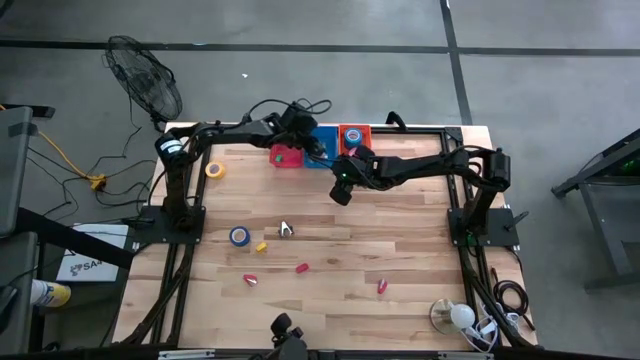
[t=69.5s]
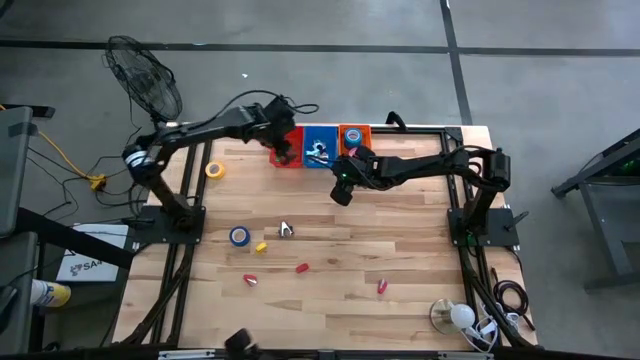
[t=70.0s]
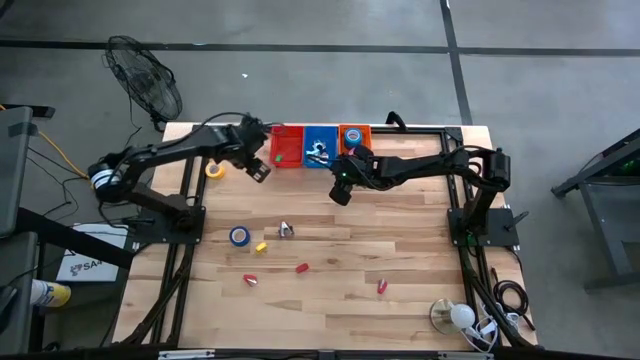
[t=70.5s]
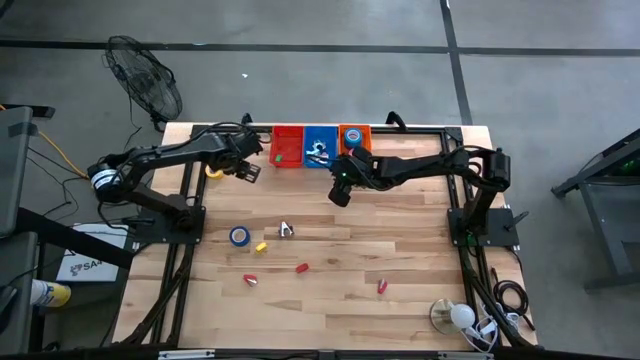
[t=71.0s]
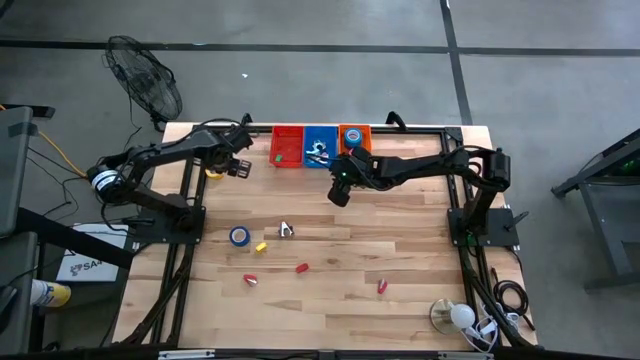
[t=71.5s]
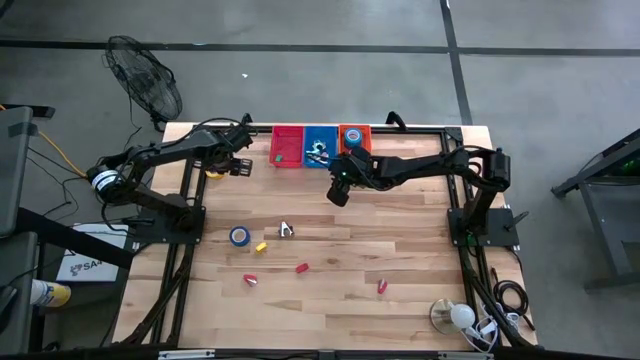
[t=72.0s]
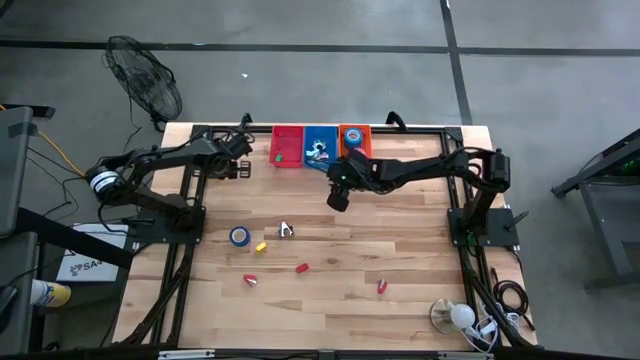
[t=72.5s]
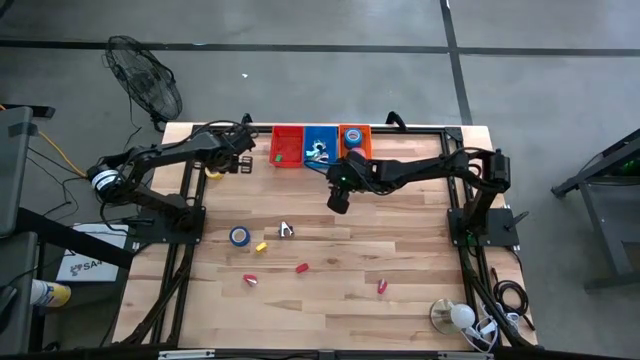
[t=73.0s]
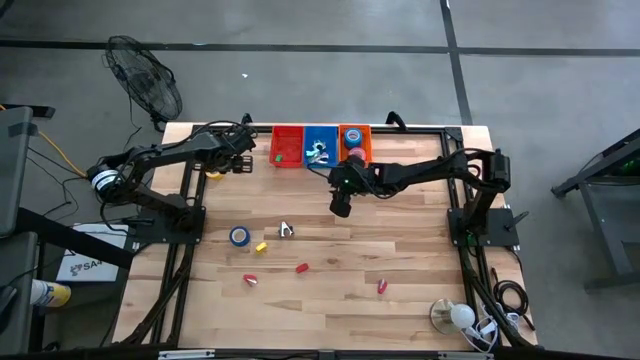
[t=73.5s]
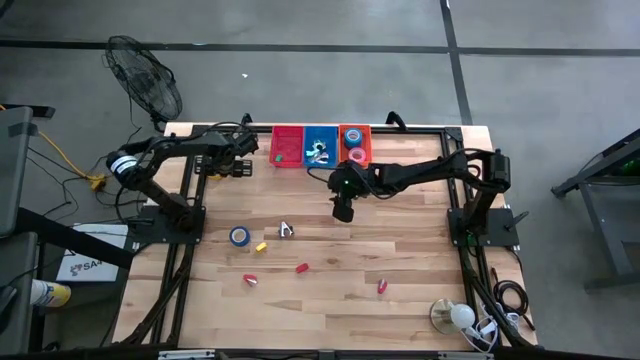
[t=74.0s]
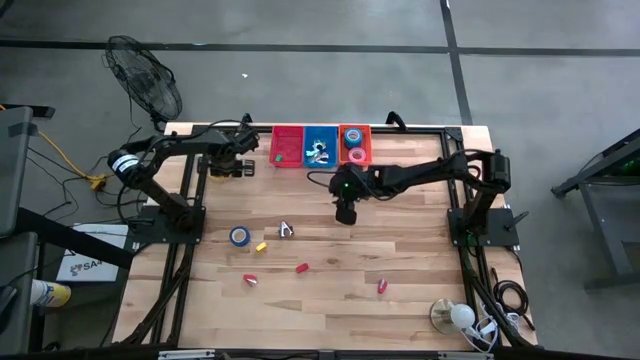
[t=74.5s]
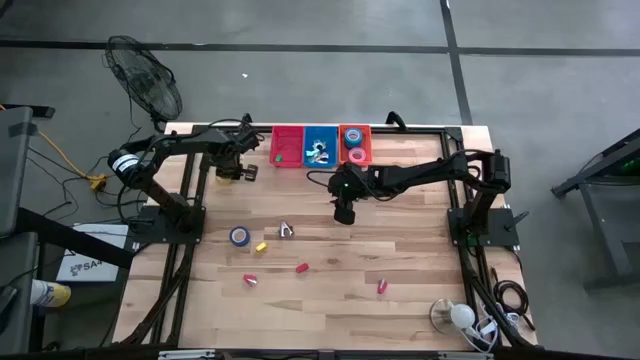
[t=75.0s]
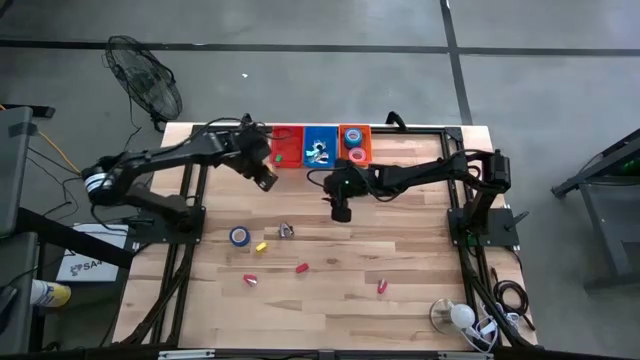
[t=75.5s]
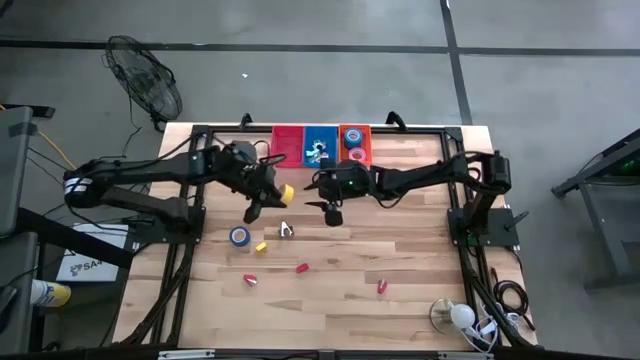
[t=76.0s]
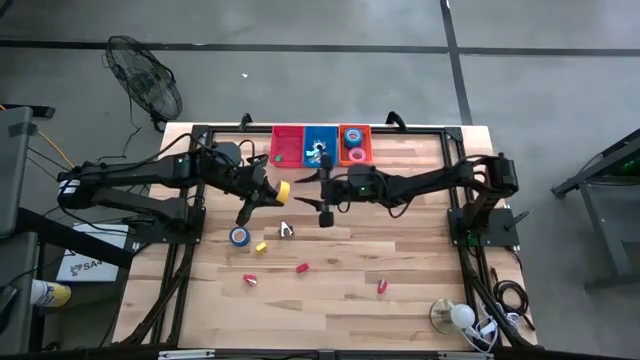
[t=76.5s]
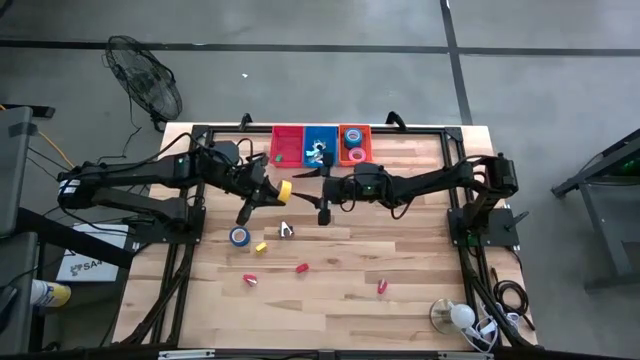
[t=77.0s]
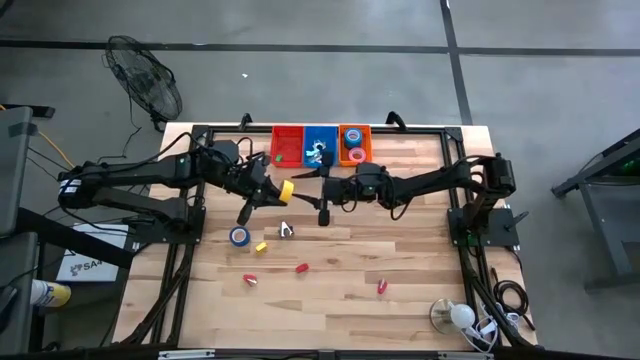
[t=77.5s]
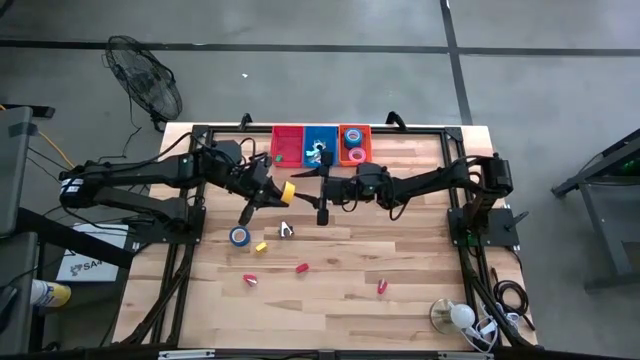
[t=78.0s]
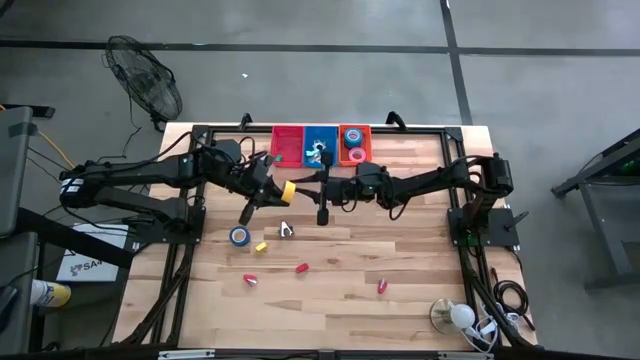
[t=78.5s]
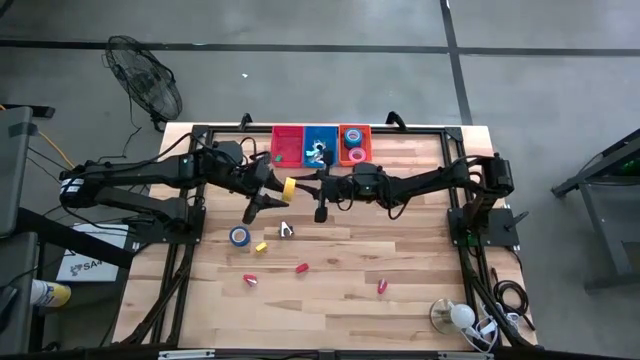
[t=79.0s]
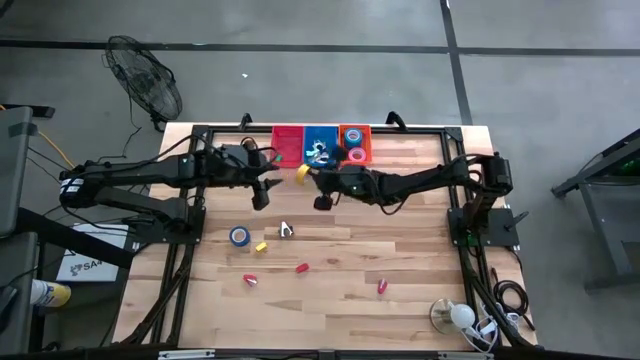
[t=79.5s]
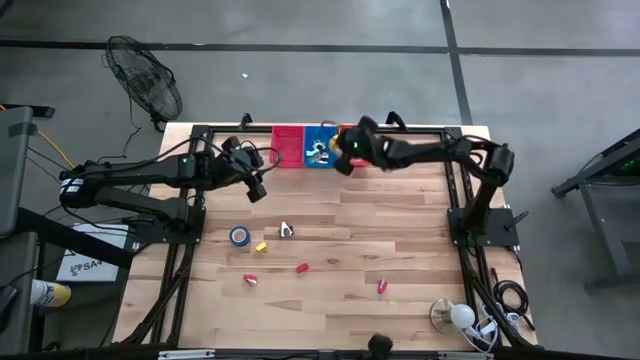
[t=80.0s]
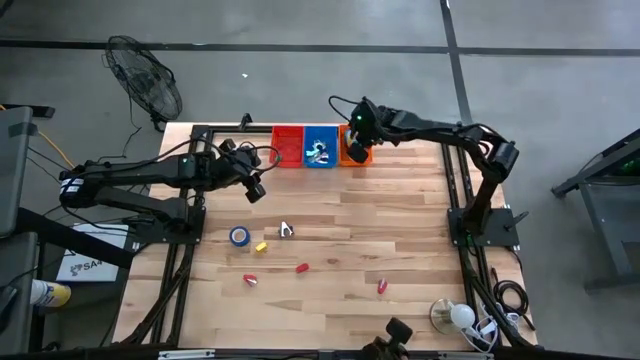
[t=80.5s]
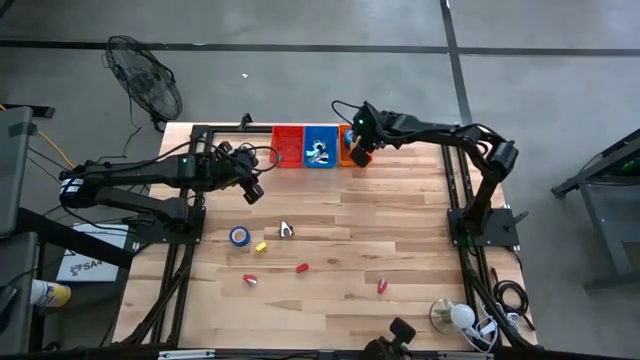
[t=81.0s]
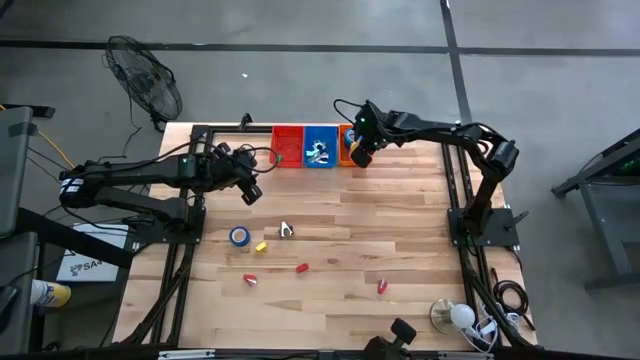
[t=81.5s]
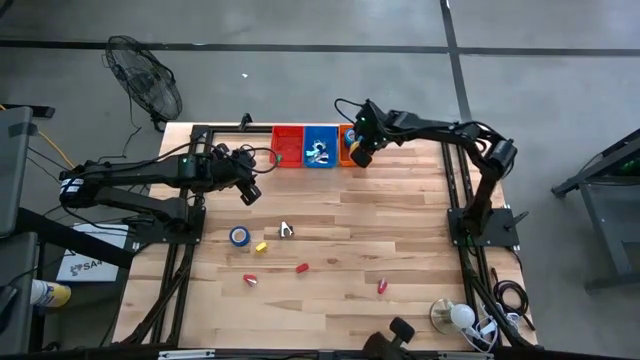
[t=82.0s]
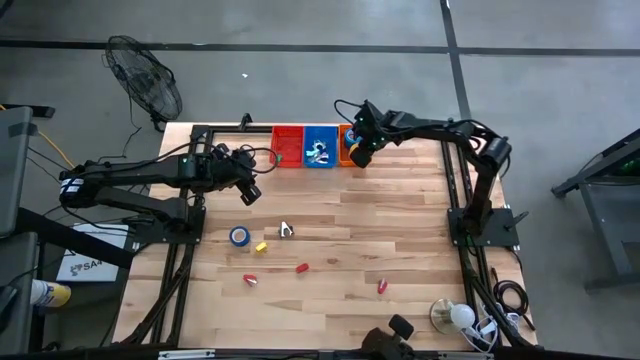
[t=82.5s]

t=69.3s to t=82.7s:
Task: Pick and place Stapler, Stapler remover, tape
Put the yellow tape into the orange bin

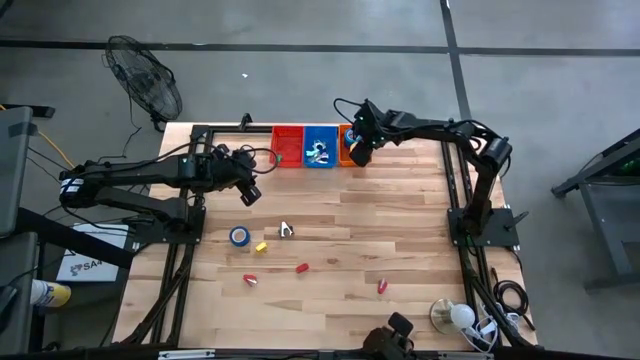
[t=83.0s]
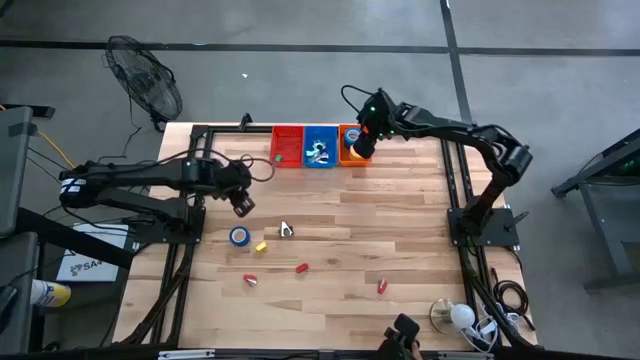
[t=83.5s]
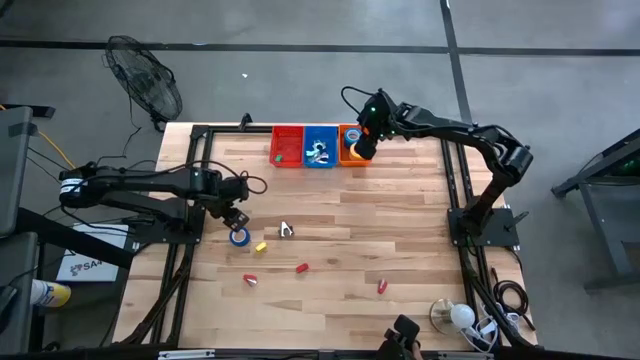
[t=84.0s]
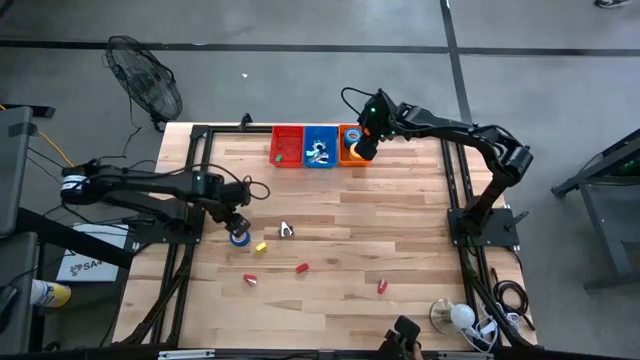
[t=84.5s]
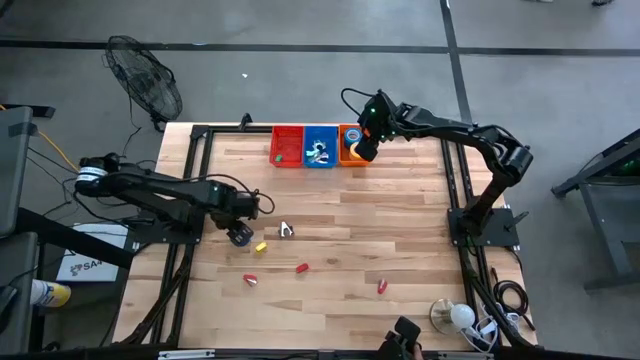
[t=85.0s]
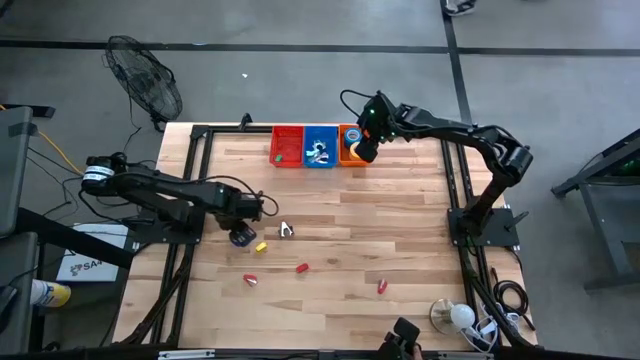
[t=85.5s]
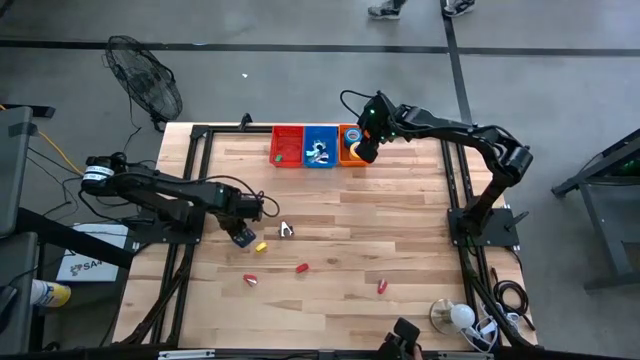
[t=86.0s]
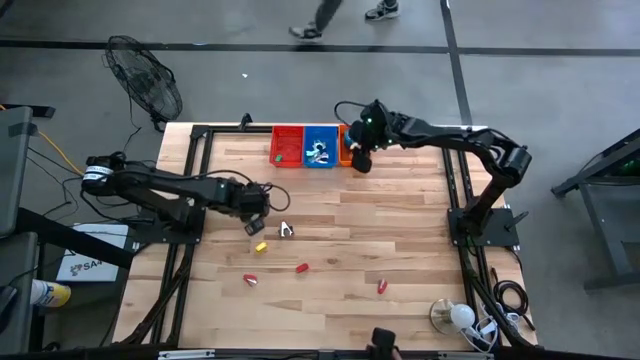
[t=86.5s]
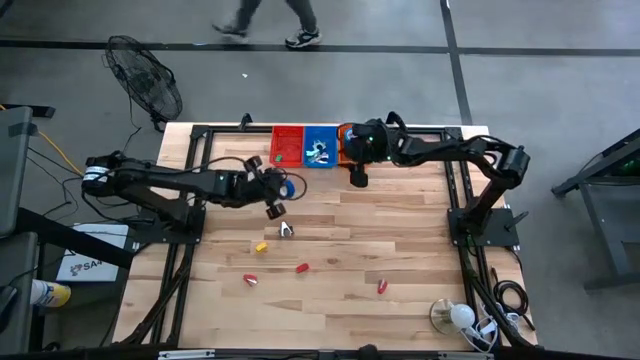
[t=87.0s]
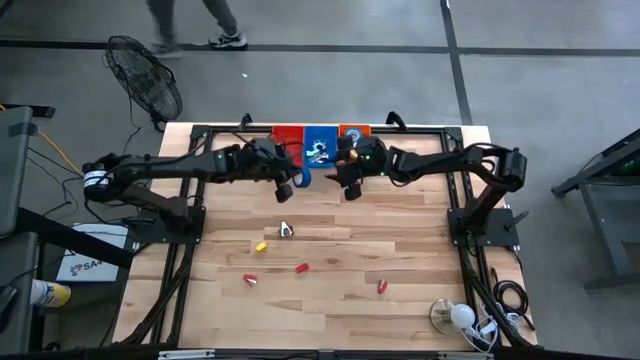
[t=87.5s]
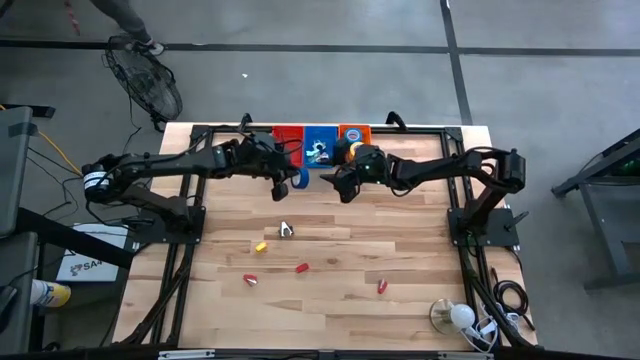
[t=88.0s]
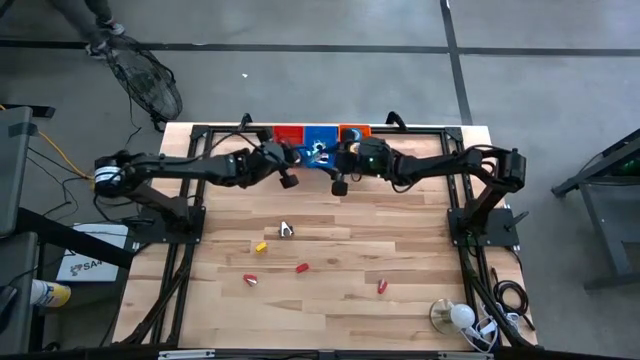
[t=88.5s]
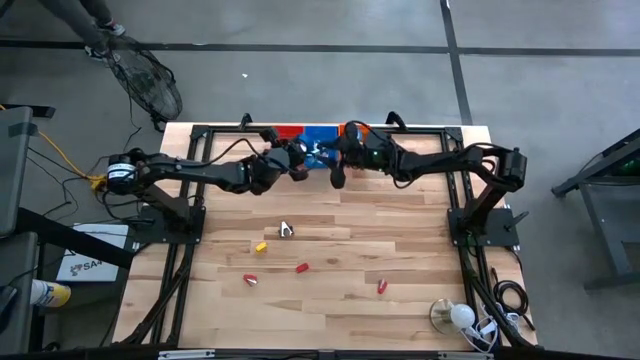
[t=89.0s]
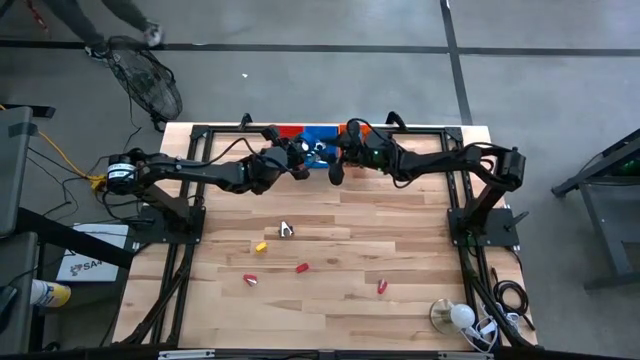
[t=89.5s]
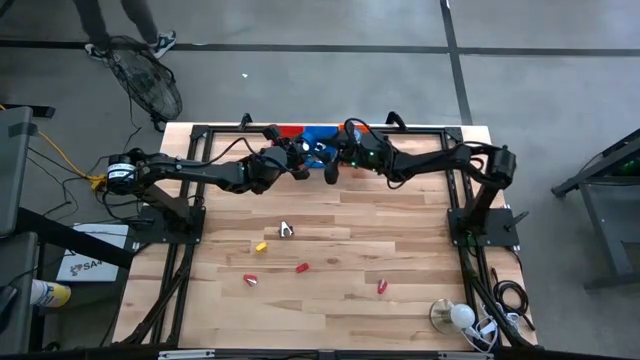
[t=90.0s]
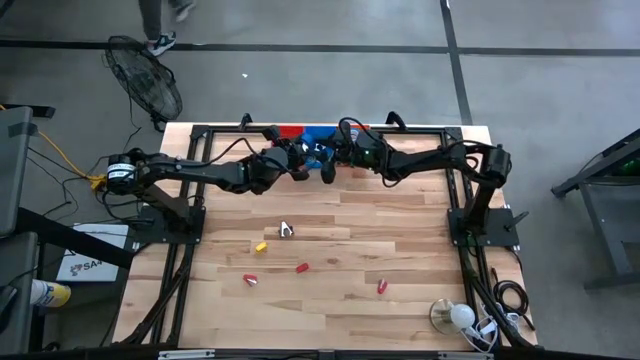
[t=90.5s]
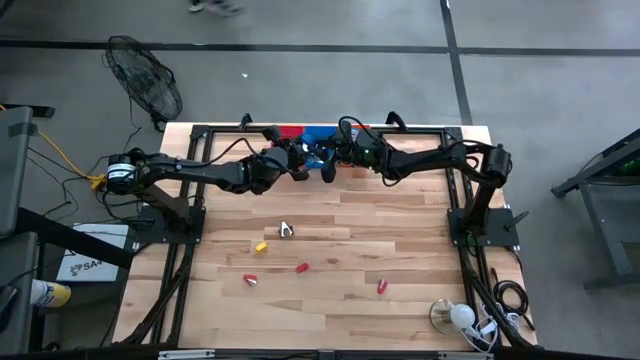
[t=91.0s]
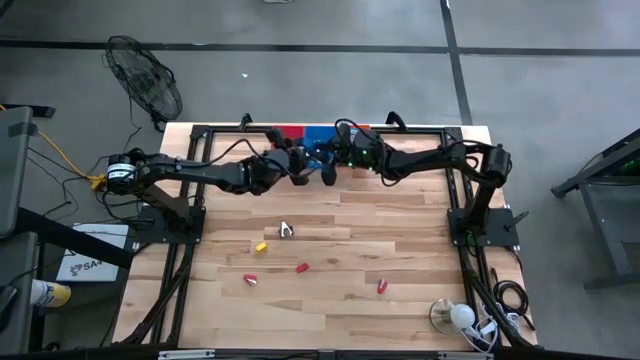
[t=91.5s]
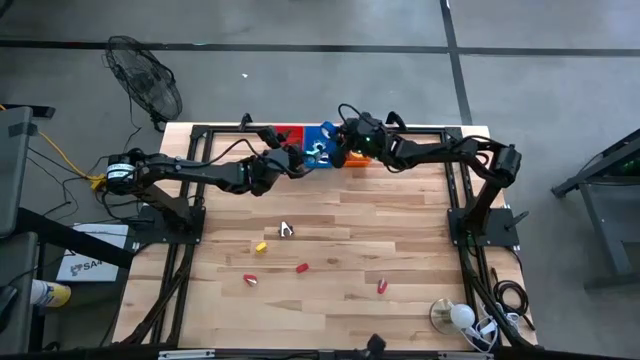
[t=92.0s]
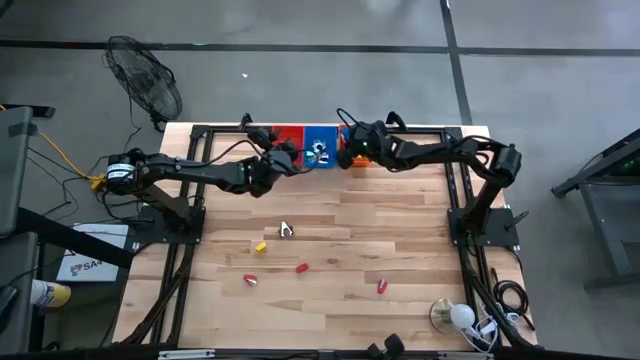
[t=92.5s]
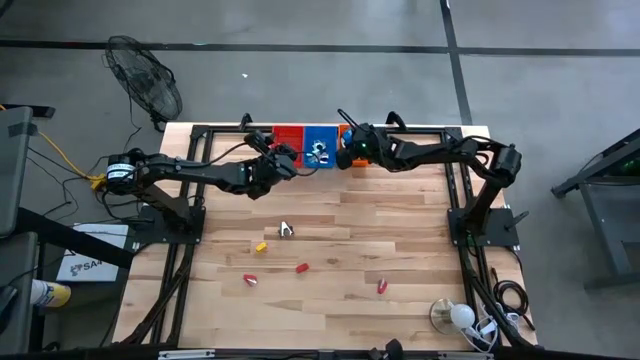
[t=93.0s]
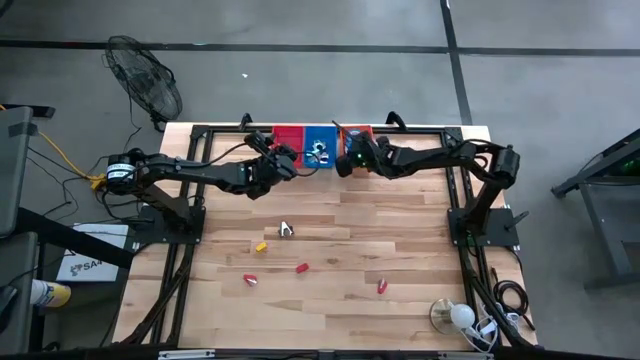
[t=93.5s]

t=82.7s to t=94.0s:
Put the blue tape into the orange bin
